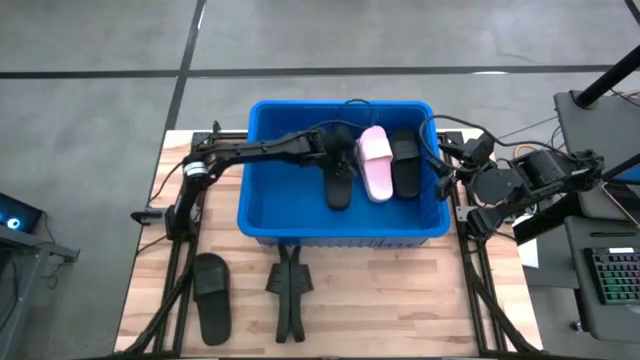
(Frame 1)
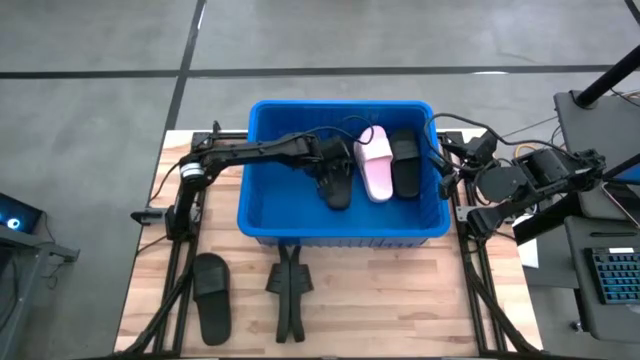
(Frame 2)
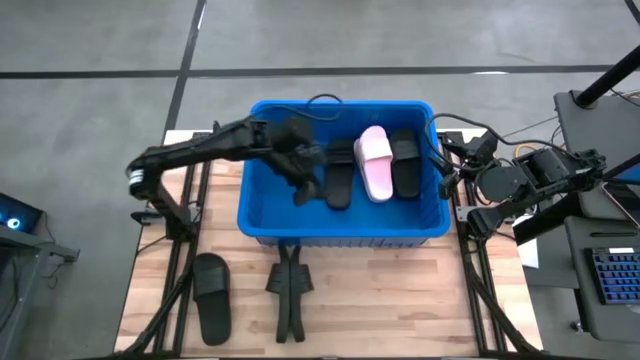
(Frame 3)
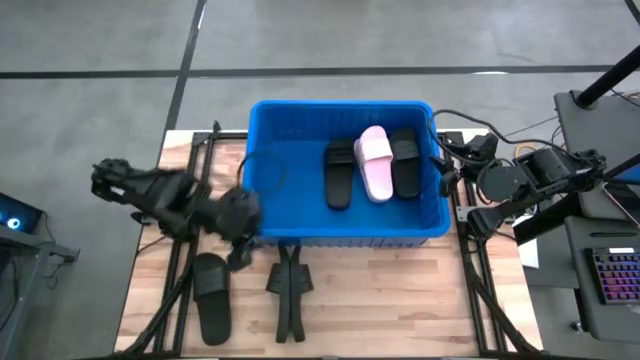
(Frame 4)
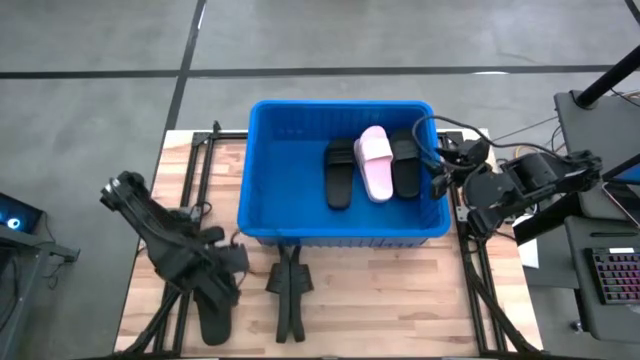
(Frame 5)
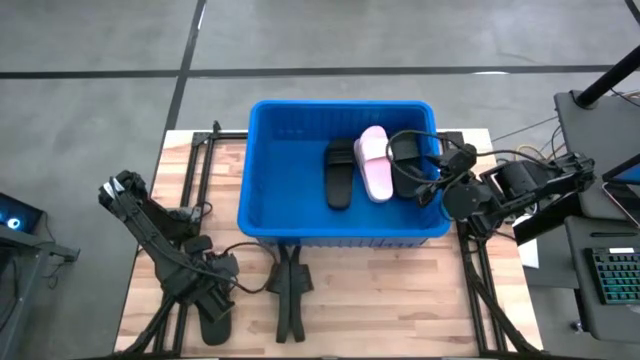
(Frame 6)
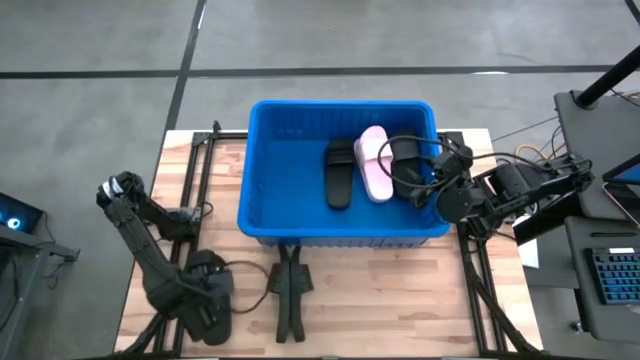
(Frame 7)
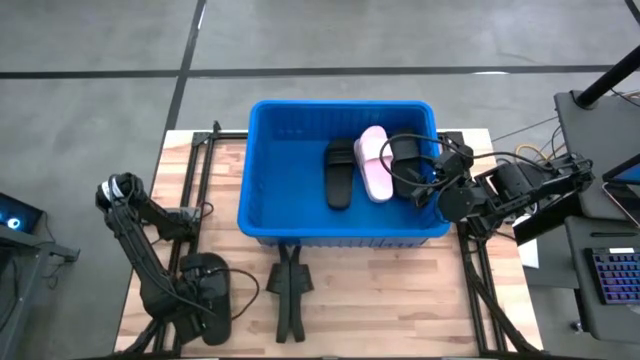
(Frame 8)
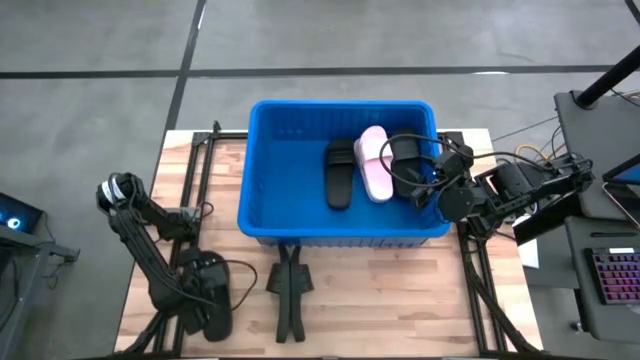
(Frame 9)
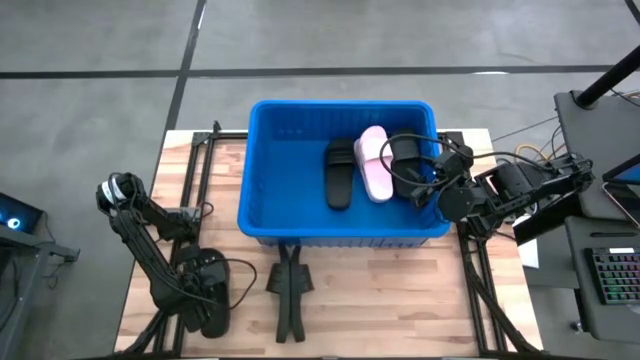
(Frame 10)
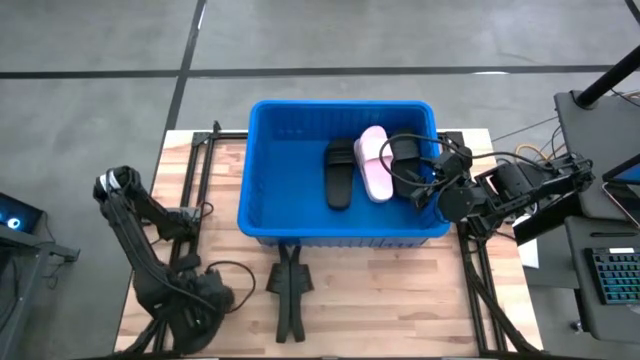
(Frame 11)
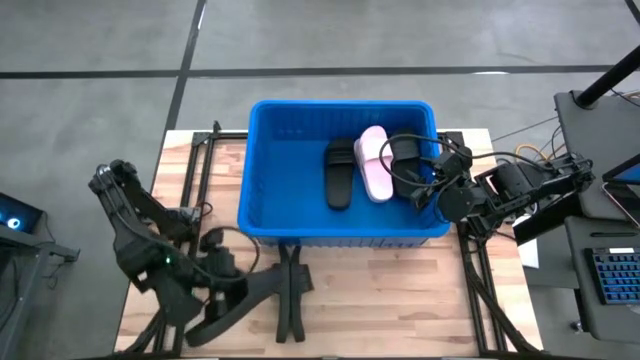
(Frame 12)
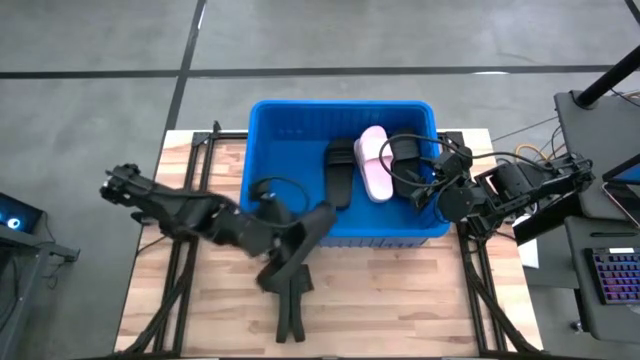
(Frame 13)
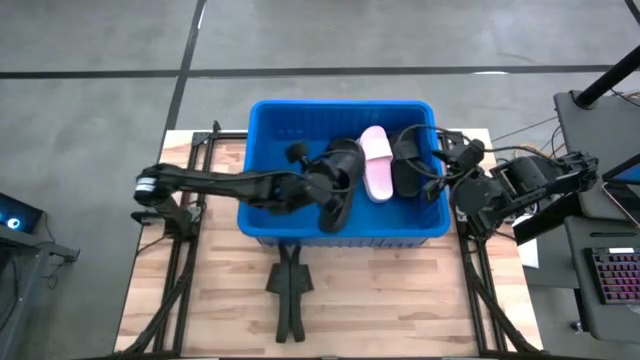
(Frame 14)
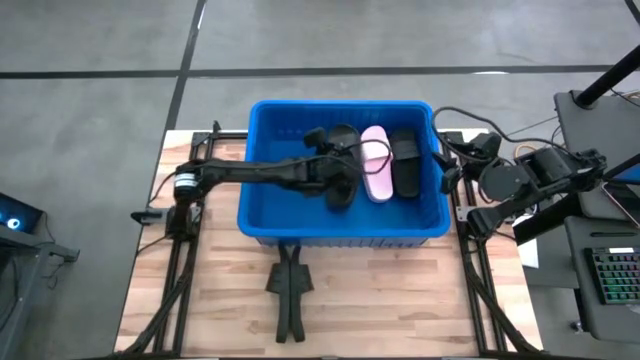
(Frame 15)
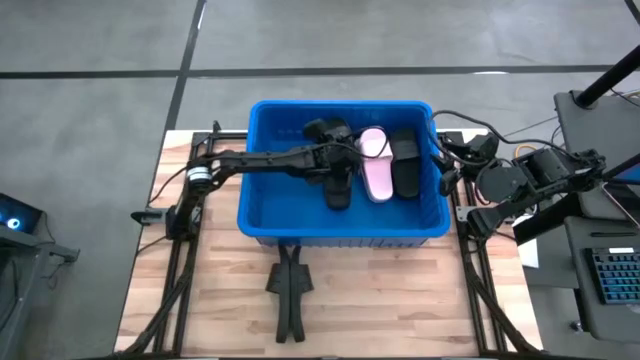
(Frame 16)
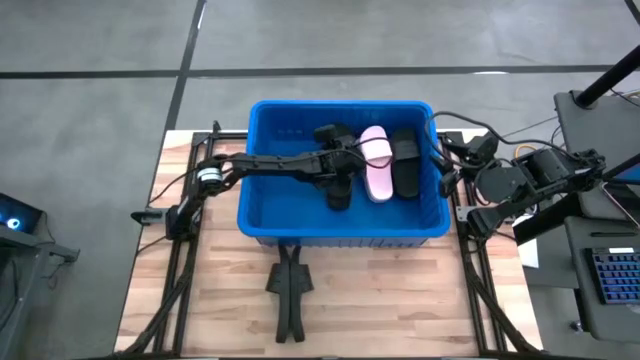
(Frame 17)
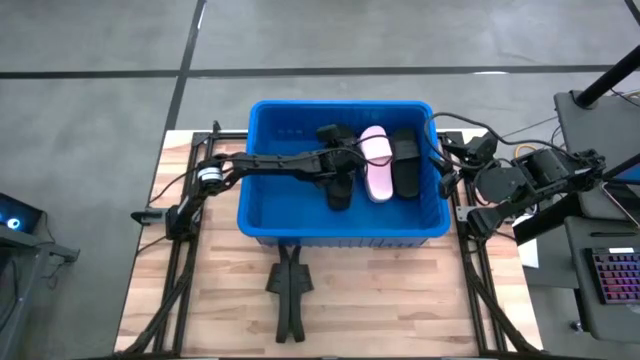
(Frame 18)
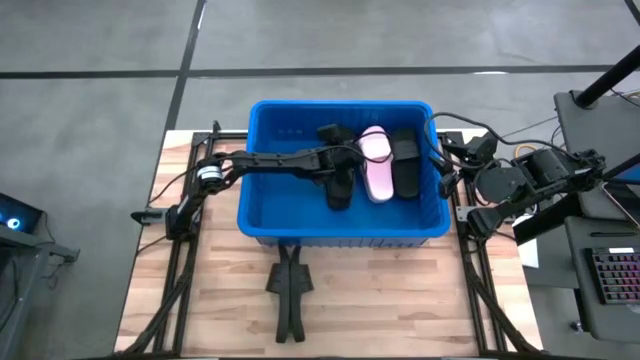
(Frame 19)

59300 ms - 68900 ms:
Task: Pick and place slides into bin
Put the black slide into the blue bin

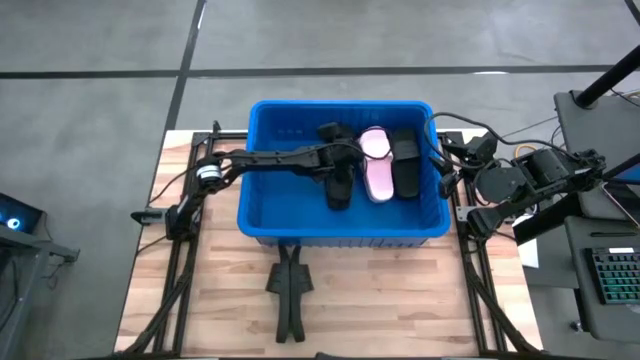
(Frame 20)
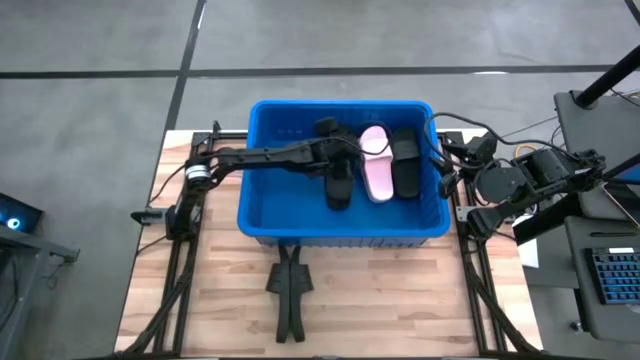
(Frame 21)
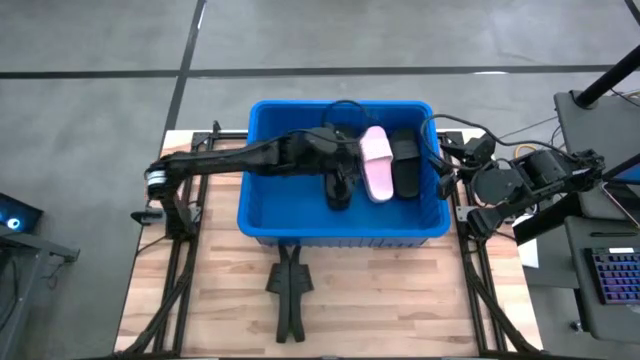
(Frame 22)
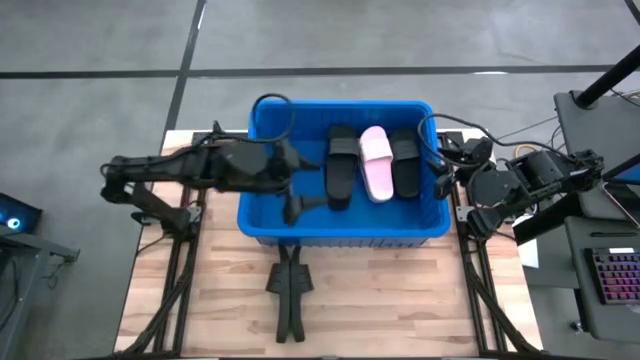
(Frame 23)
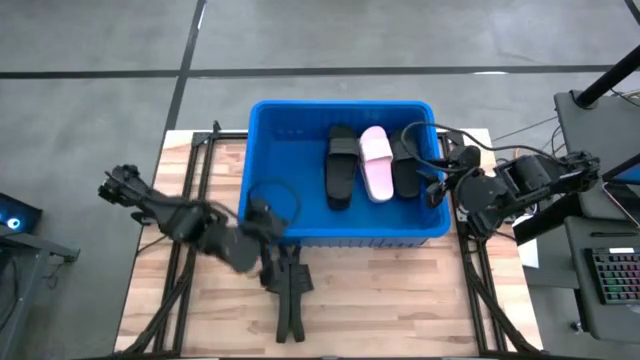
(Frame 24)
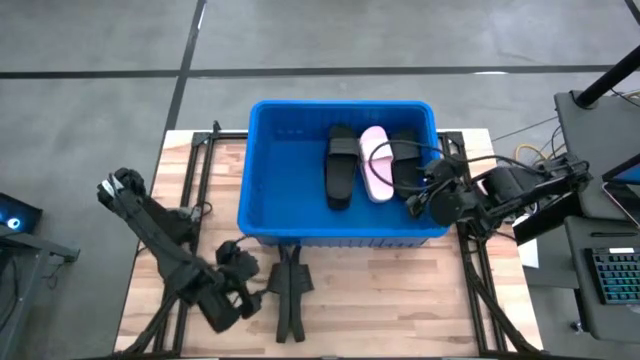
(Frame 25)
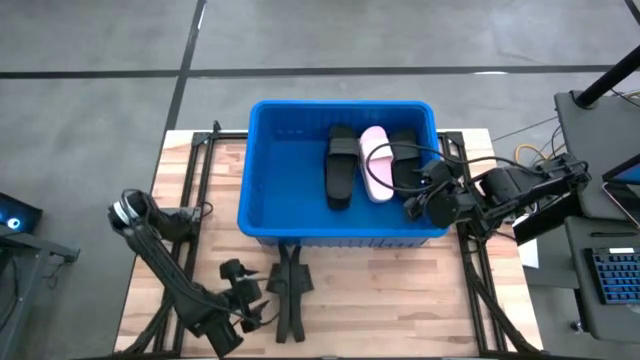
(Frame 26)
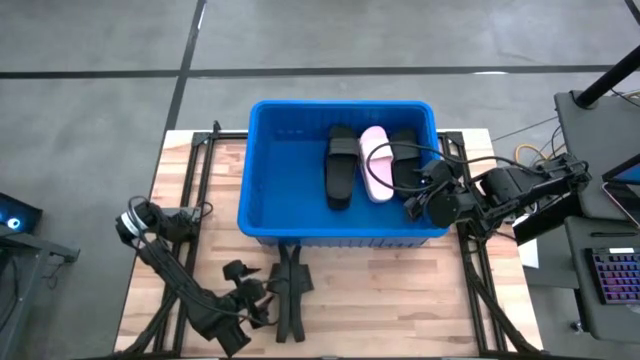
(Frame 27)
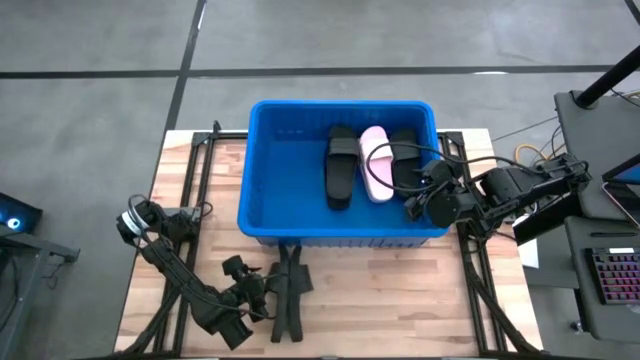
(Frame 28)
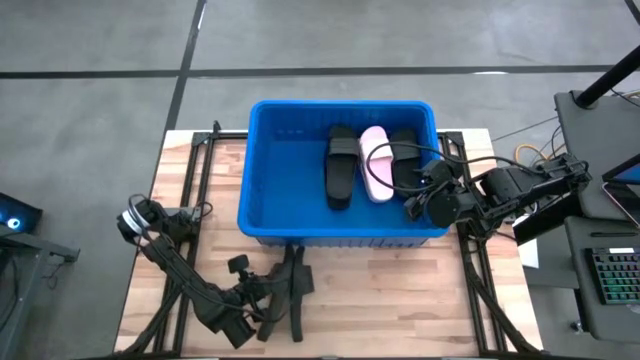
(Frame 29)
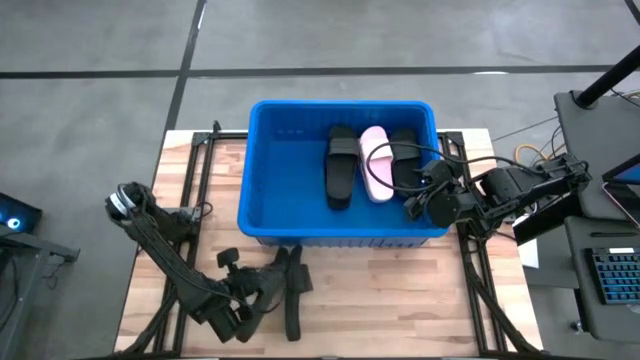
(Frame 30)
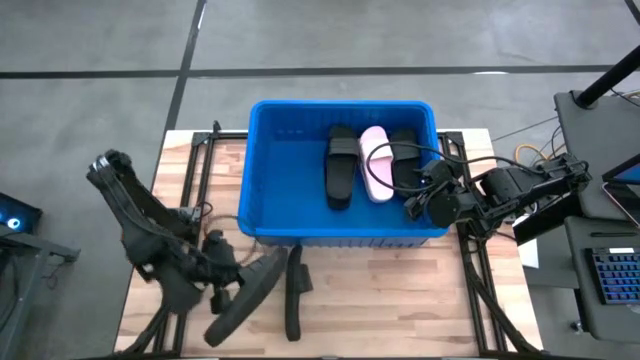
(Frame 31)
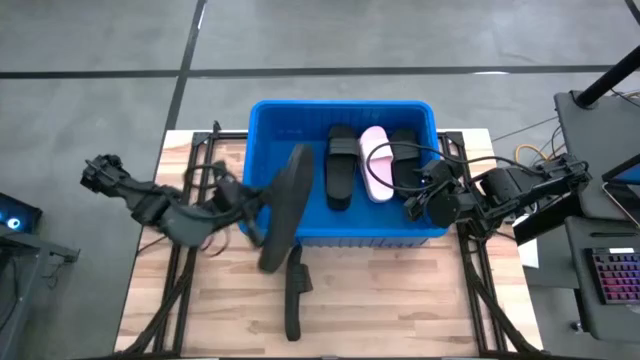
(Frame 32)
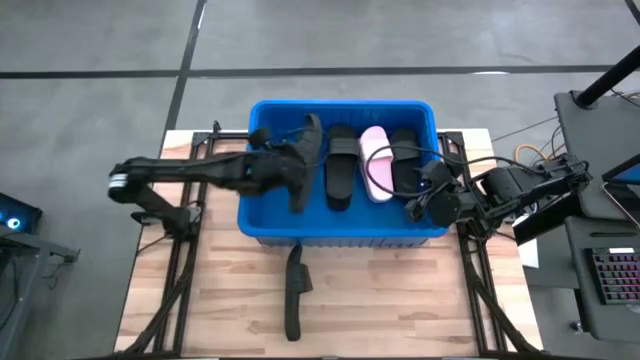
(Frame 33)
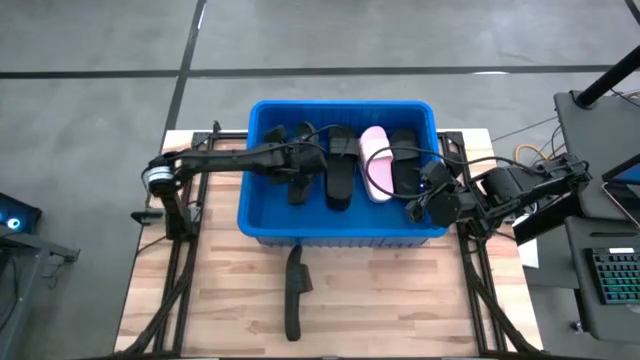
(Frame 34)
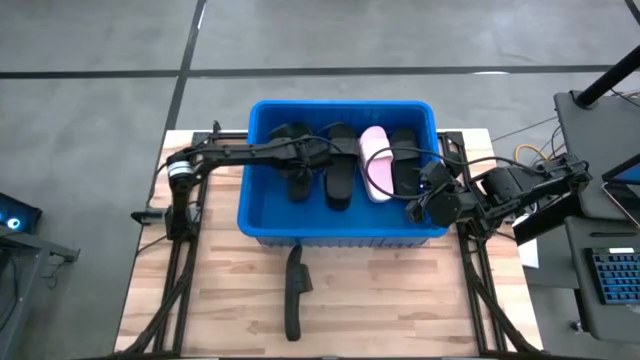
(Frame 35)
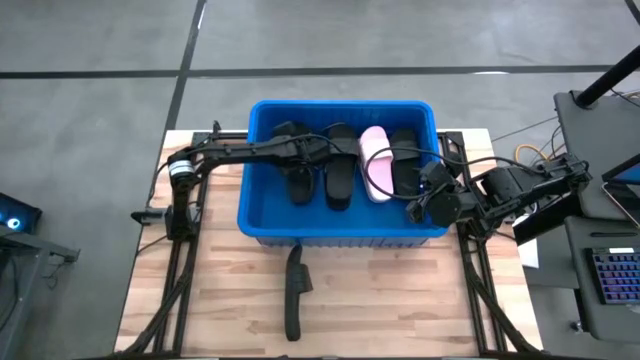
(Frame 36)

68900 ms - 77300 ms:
Put the black slide into the blue bin

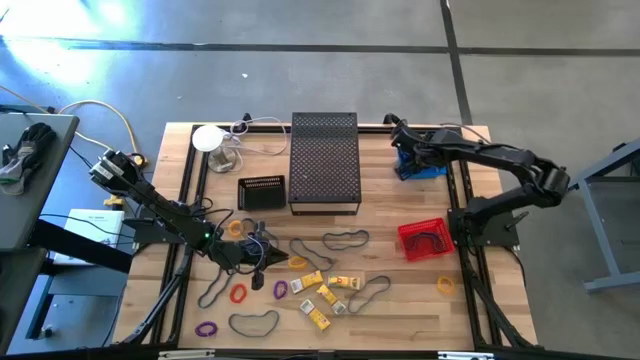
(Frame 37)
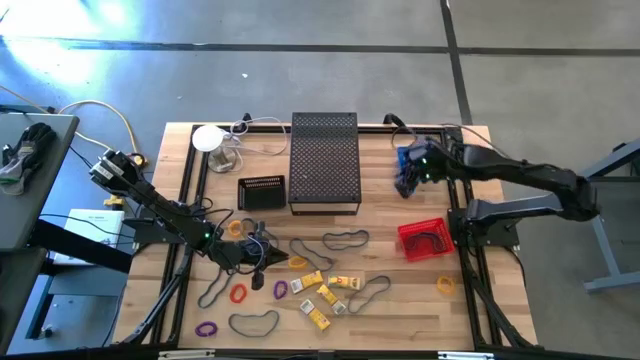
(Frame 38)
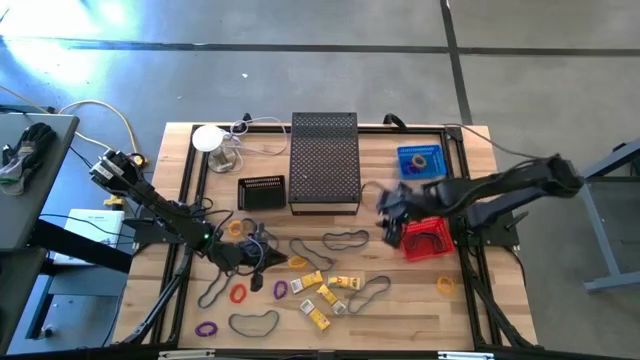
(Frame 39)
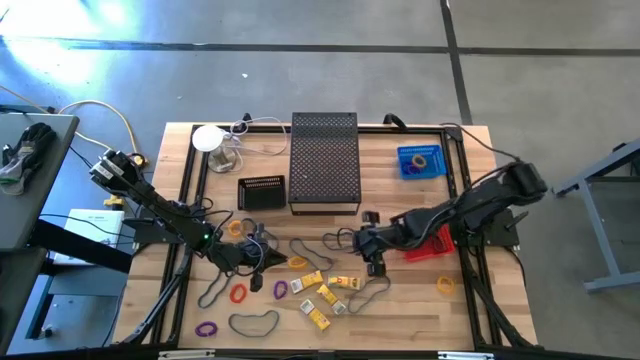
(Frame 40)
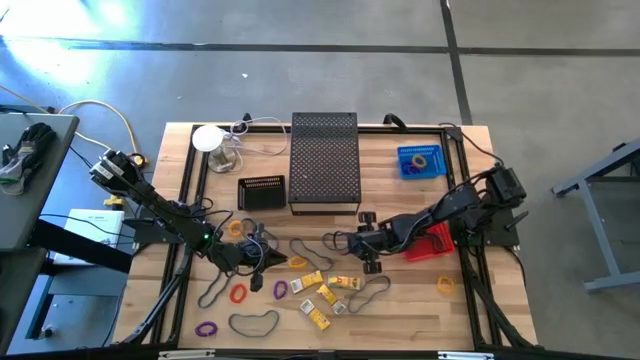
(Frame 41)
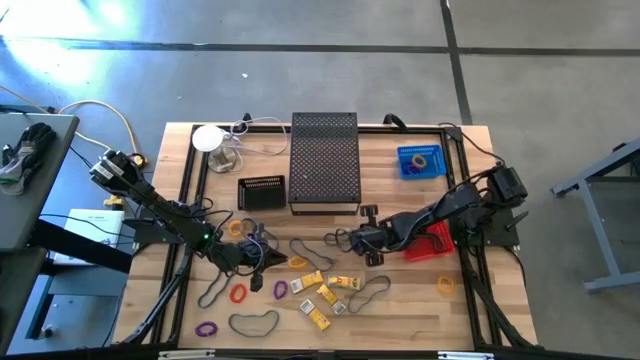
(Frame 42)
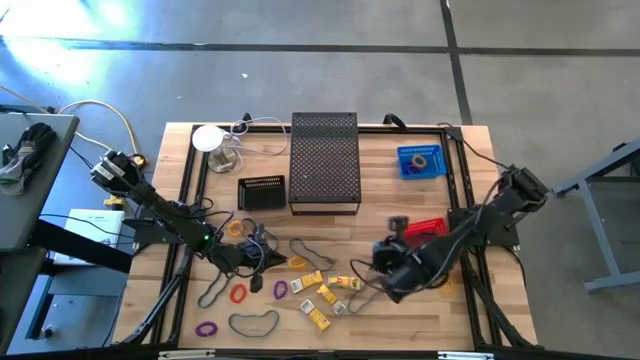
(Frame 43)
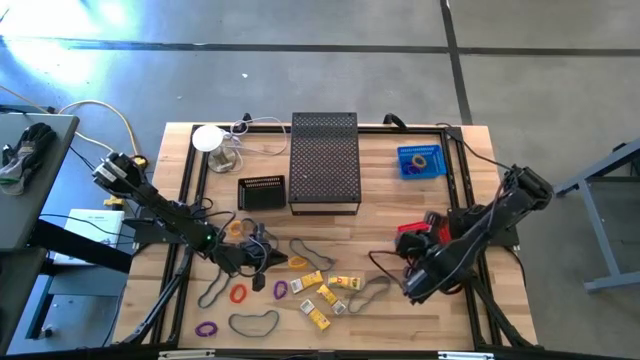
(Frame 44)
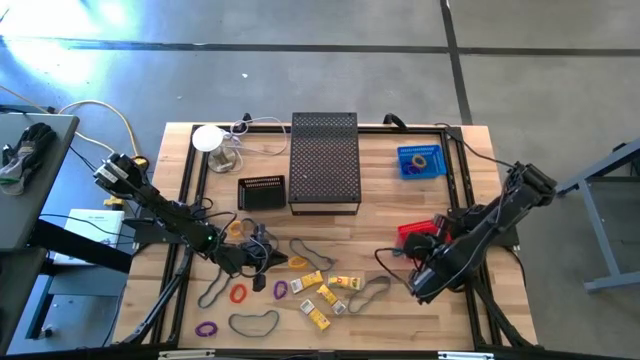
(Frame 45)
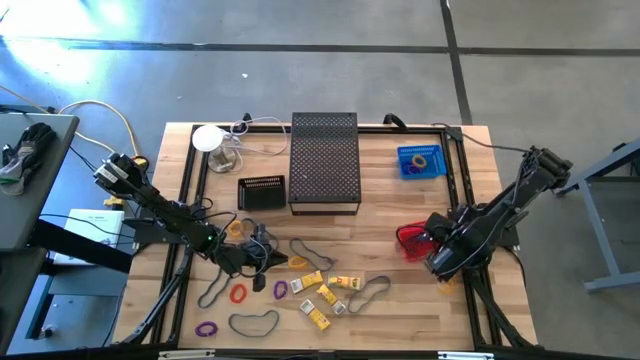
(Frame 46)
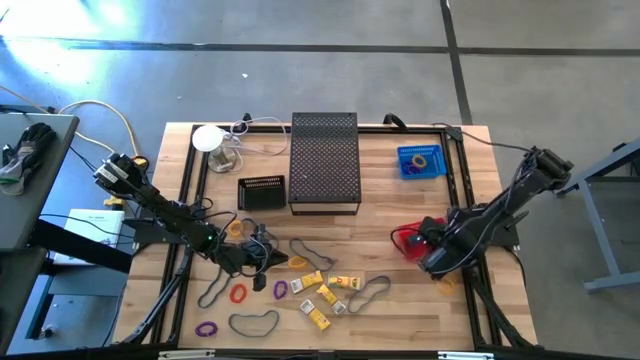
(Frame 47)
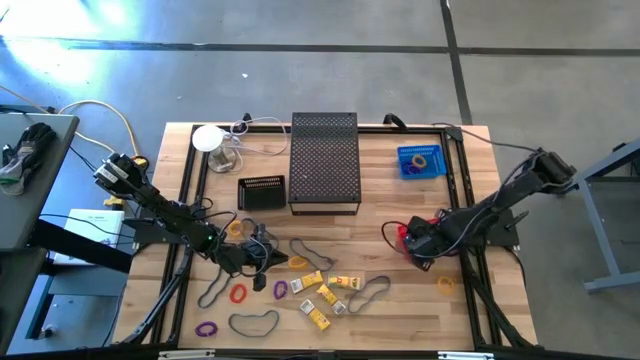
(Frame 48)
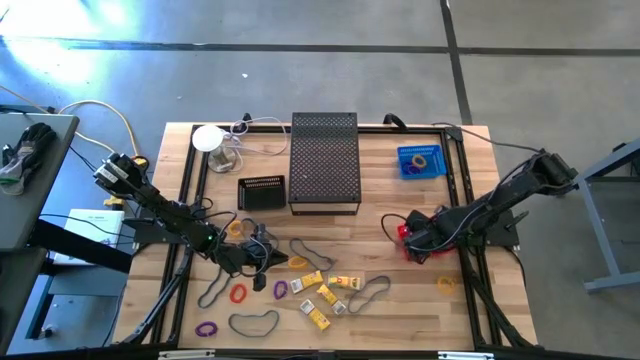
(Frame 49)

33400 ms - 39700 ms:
Task: Pick & Place Office Desk Supplies
Put the blue rubber band into the red bin
